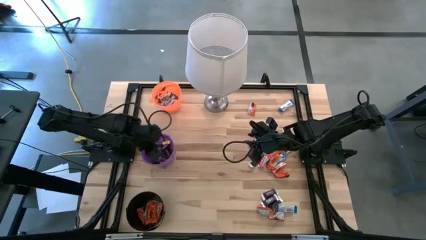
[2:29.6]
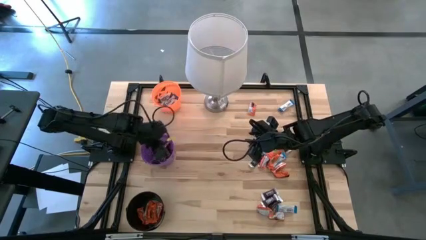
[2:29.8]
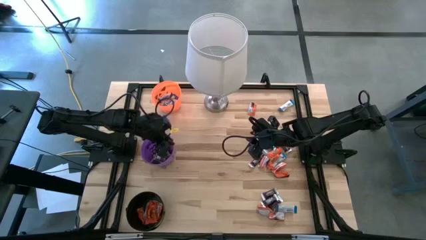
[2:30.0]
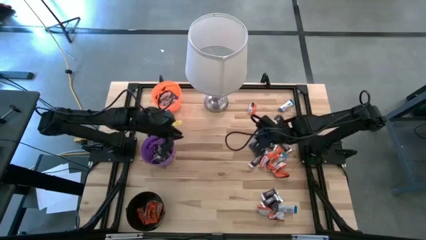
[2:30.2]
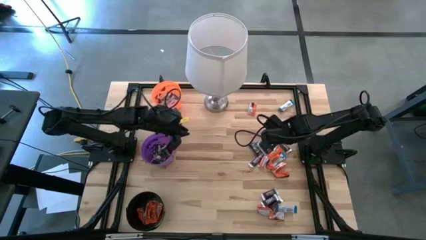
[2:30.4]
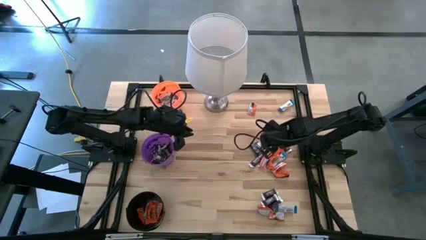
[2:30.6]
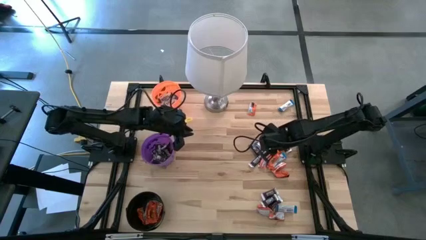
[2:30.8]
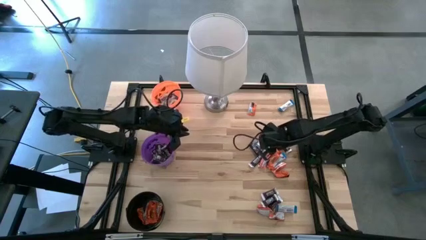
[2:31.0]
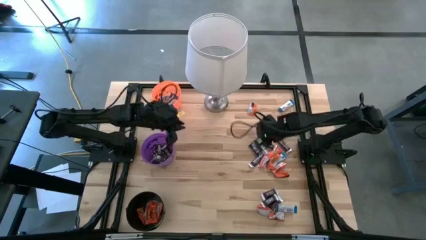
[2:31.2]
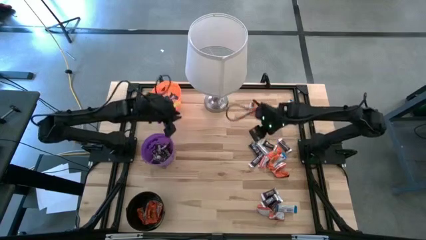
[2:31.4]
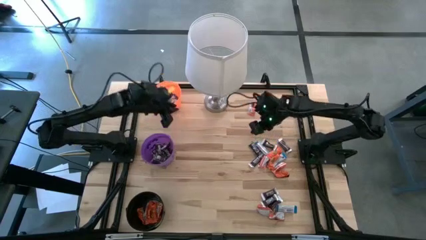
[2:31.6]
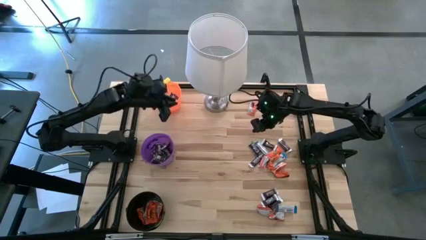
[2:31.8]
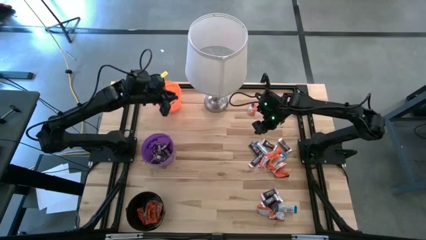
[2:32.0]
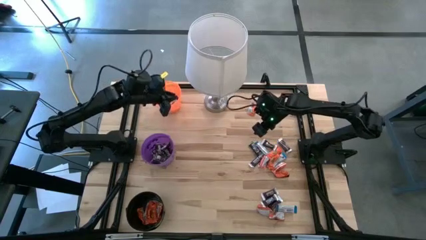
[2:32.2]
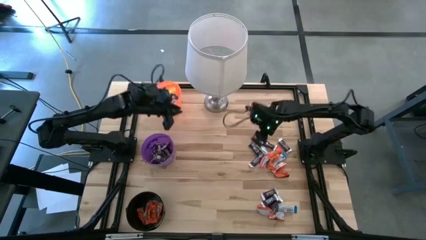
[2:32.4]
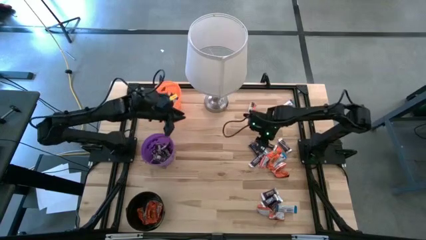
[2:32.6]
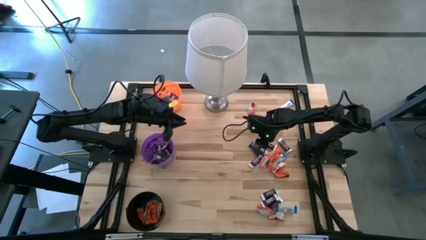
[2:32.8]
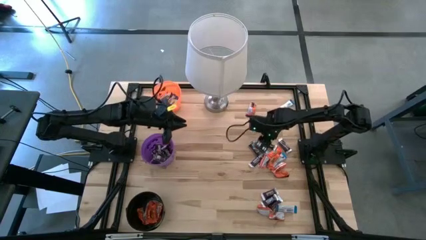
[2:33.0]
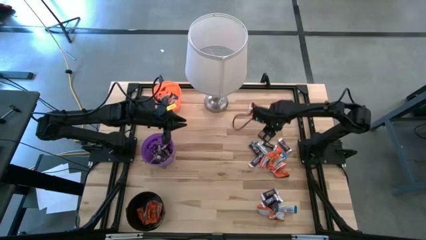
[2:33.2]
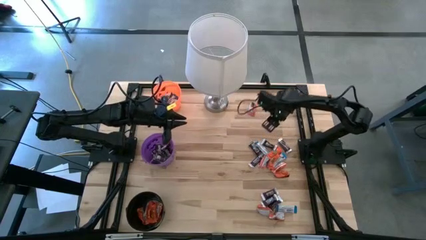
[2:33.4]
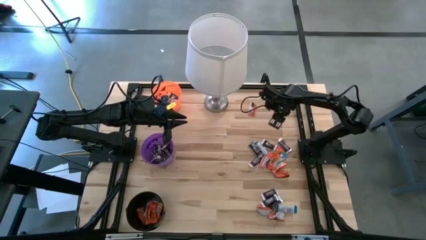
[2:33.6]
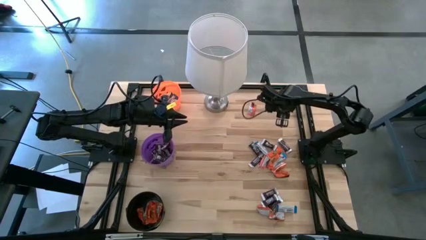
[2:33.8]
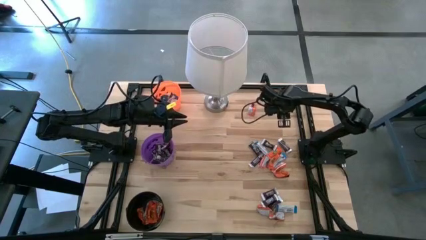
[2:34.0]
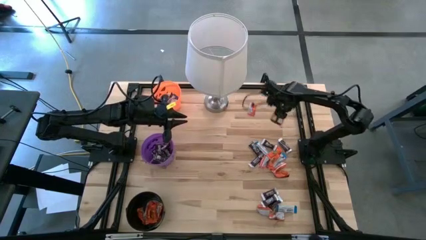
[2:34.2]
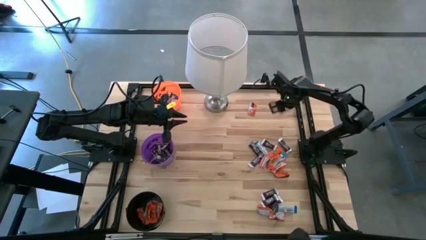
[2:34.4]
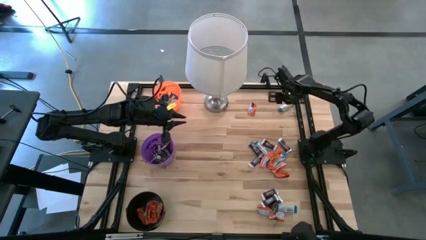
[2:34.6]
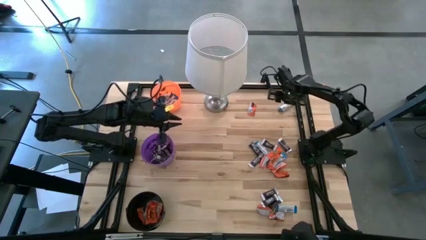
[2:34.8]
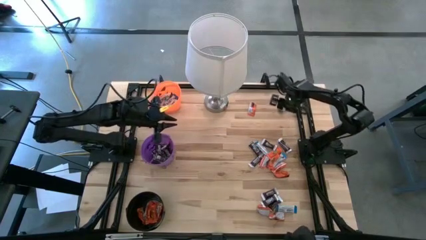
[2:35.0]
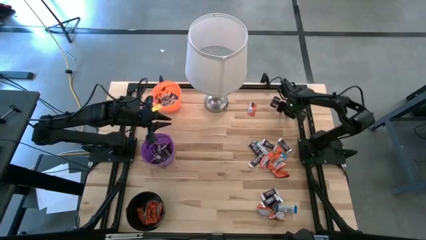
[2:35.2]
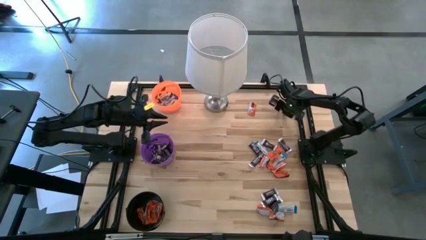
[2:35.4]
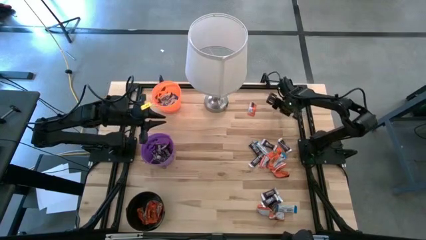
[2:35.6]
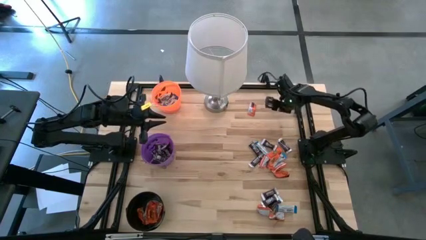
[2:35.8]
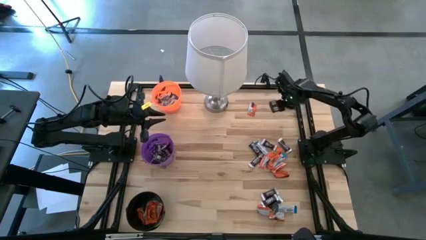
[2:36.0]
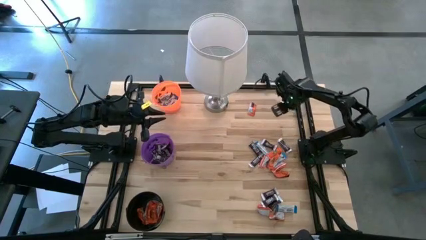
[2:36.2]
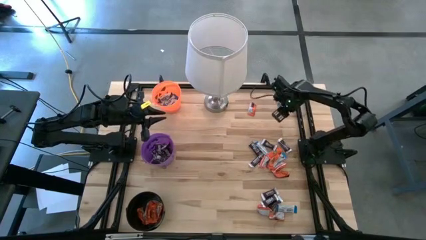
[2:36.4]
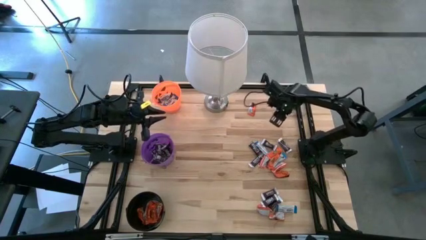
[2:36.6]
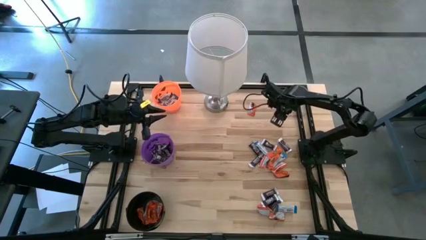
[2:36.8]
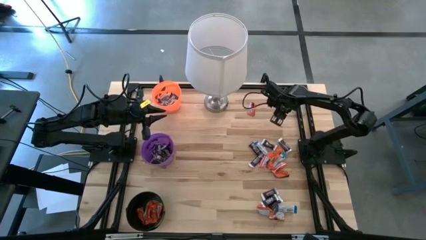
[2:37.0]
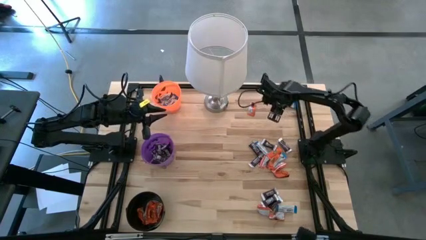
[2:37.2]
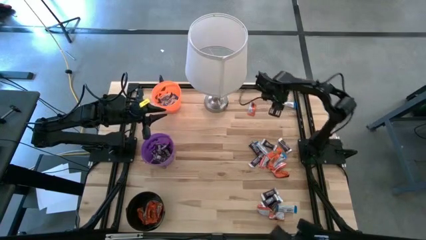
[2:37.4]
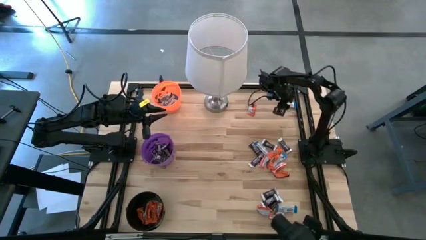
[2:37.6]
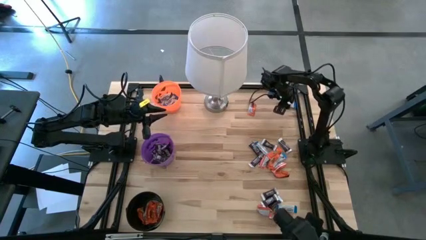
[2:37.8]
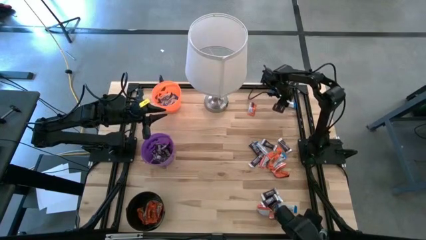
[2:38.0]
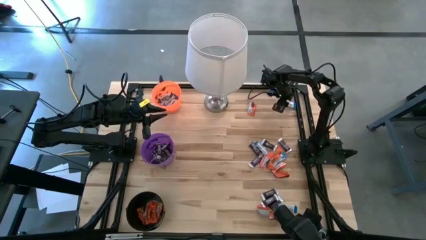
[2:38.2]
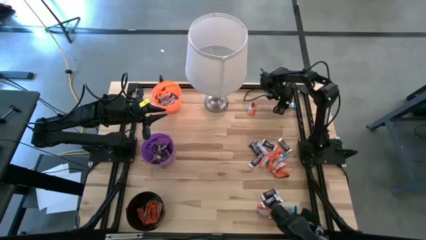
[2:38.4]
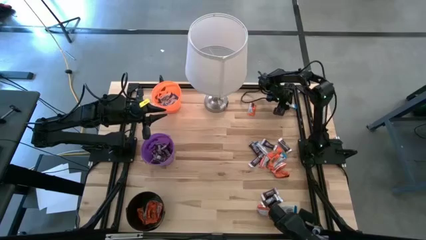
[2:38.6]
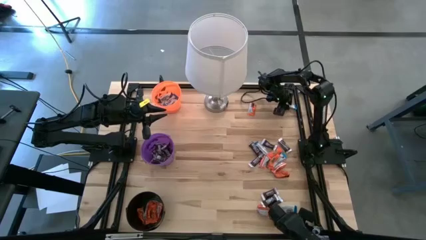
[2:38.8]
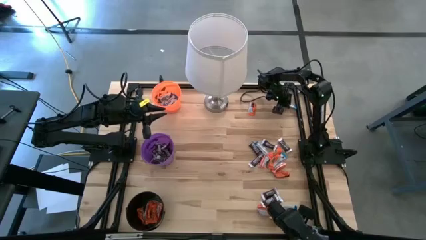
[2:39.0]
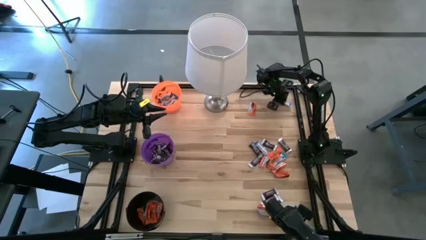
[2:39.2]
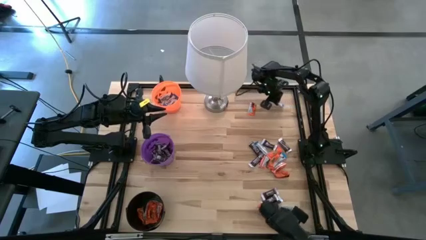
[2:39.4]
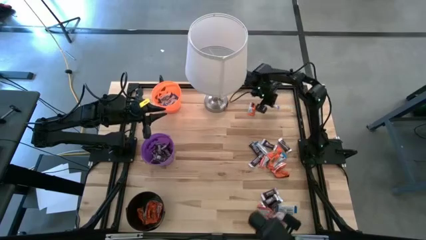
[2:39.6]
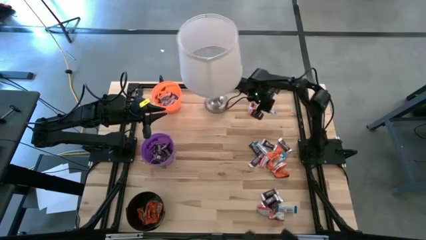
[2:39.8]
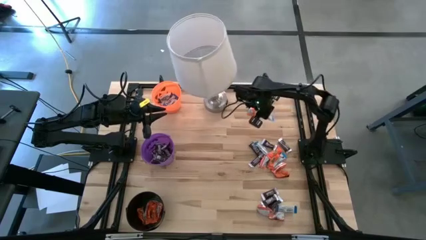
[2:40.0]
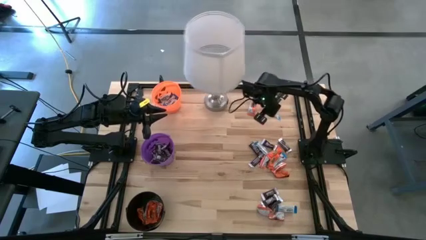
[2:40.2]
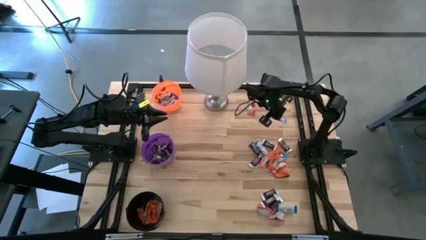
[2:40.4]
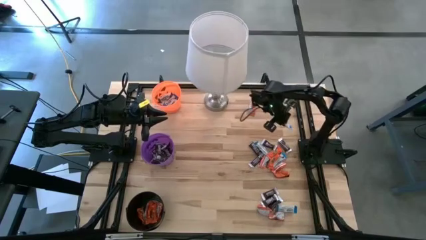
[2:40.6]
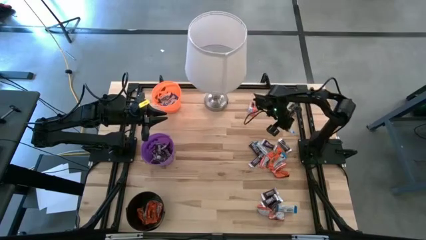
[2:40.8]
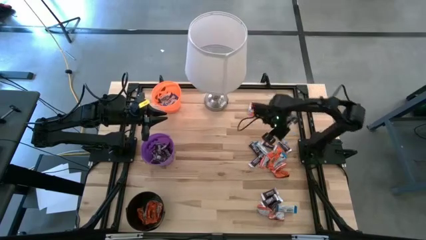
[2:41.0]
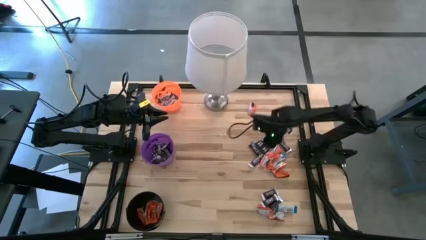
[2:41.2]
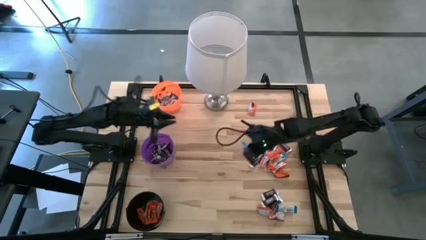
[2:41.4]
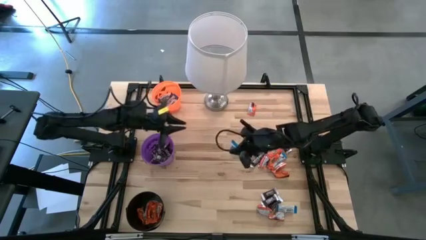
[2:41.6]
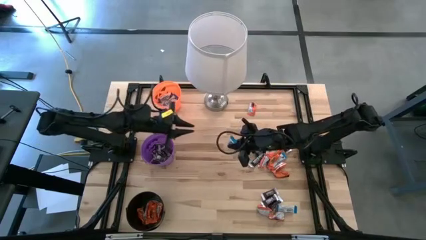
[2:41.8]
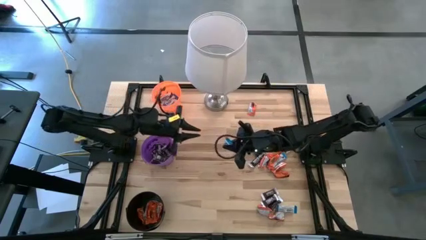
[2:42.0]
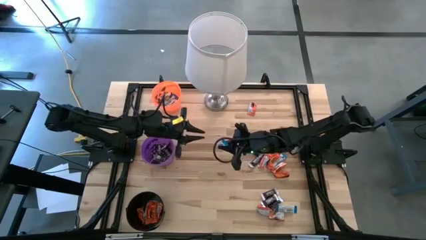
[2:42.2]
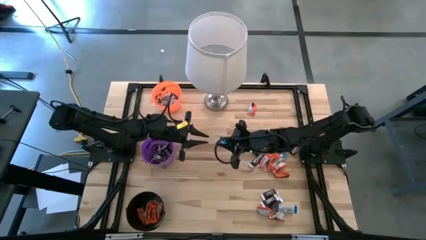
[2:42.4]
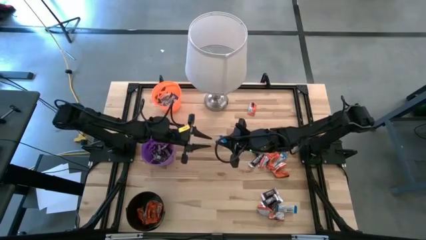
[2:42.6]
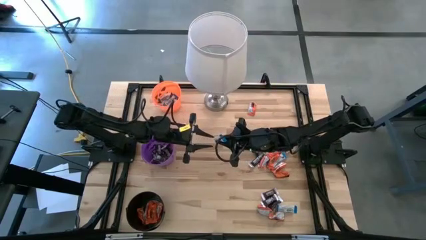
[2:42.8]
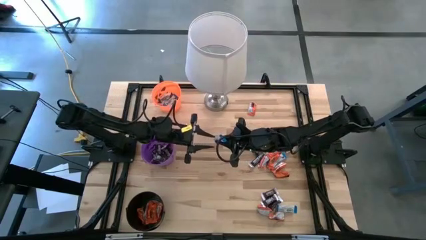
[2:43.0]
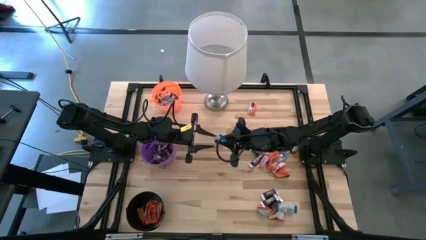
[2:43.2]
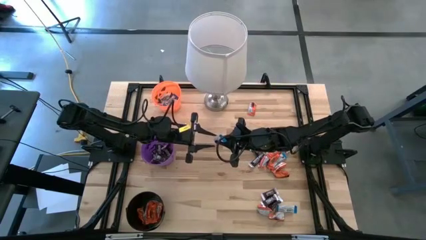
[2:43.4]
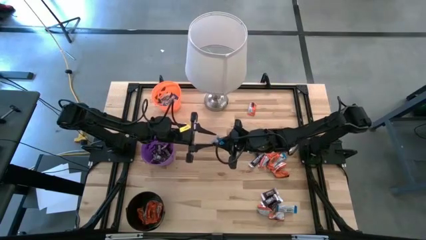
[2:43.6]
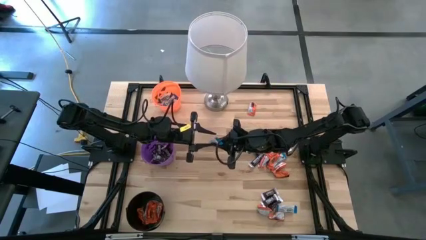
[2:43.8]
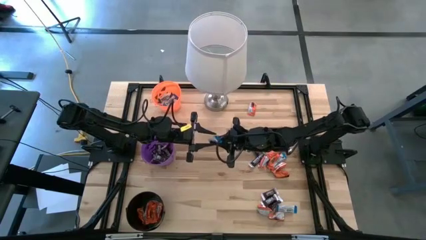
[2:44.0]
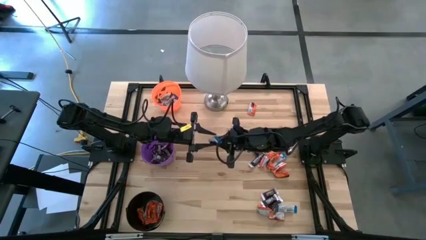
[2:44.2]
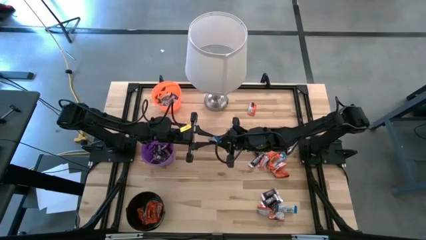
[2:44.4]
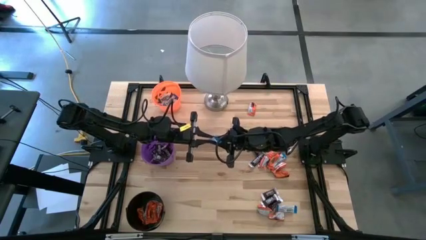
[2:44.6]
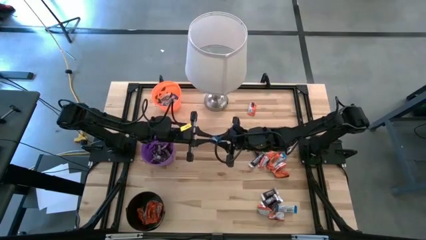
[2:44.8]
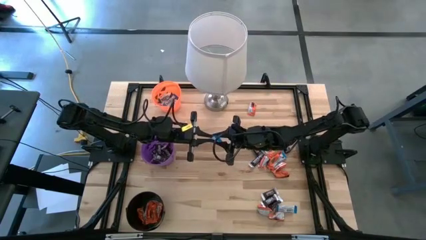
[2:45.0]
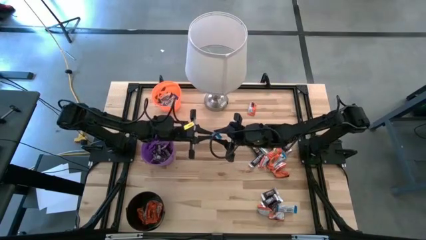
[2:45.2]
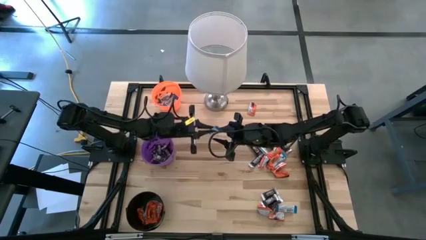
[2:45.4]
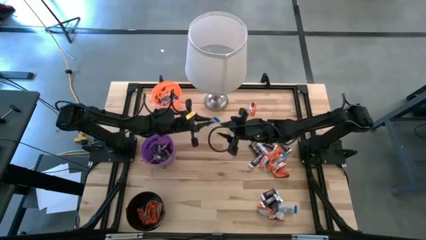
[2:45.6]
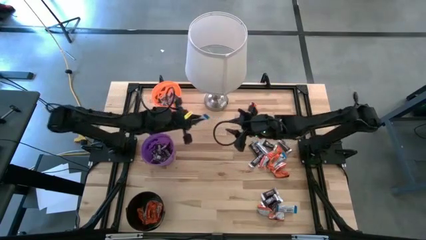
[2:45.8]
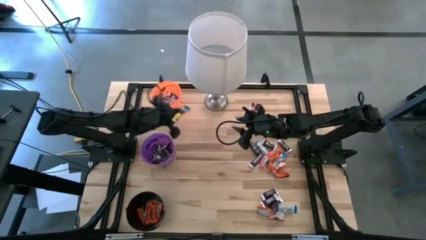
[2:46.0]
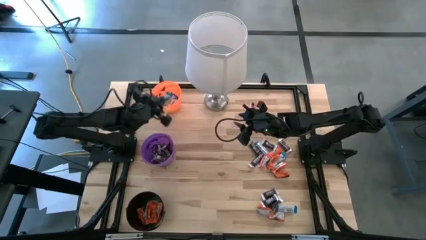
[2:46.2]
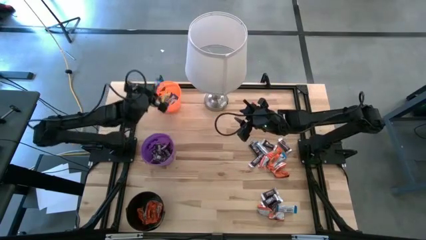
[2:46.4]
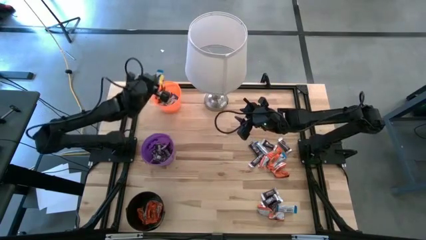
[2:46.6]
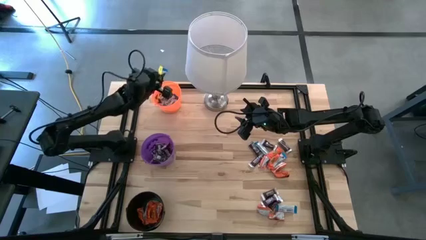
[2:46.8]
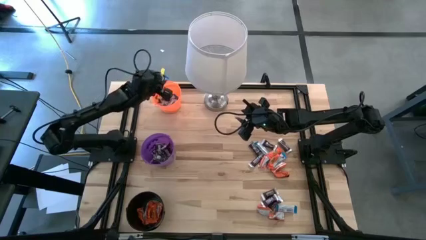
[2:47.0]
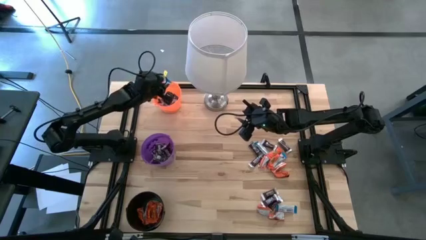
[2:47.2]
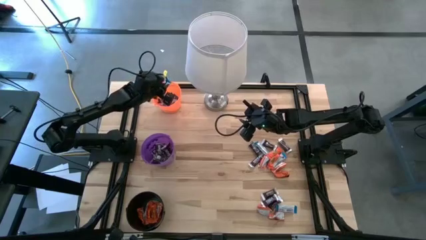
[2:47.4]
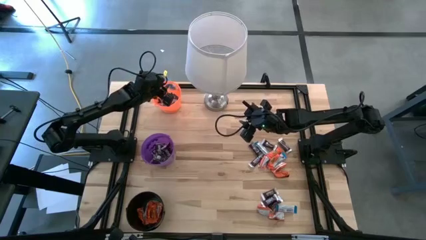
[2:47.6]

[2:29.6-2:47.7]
Task: Sort candy
Put the white chocolate into the orange bucket
